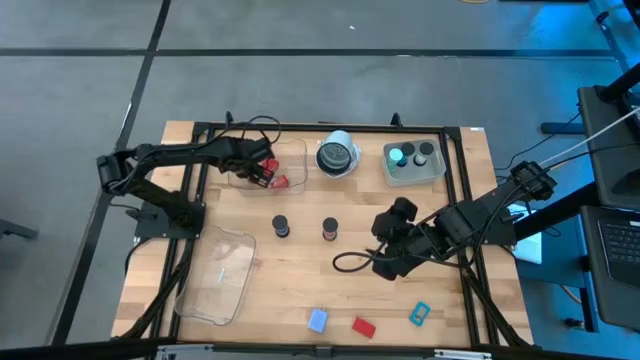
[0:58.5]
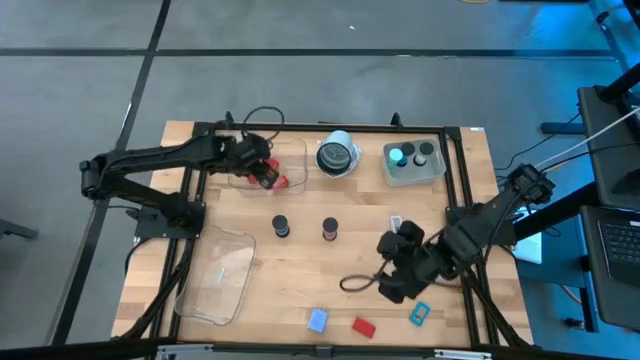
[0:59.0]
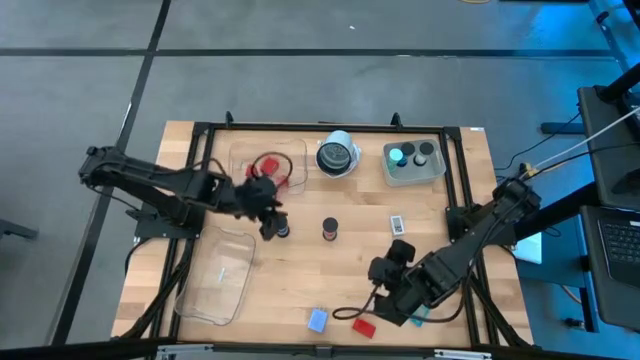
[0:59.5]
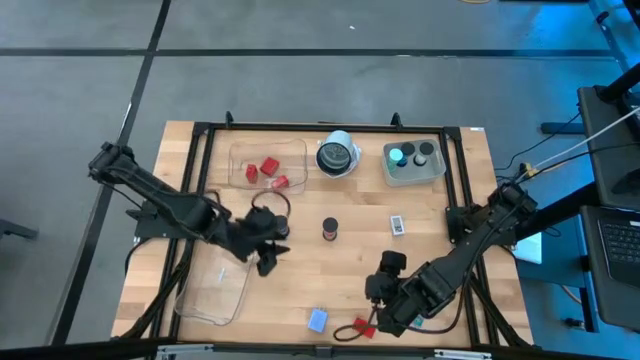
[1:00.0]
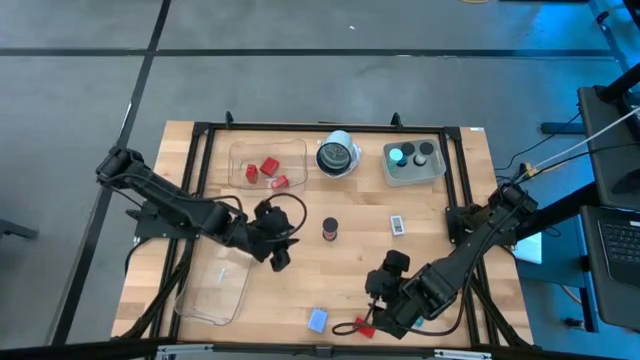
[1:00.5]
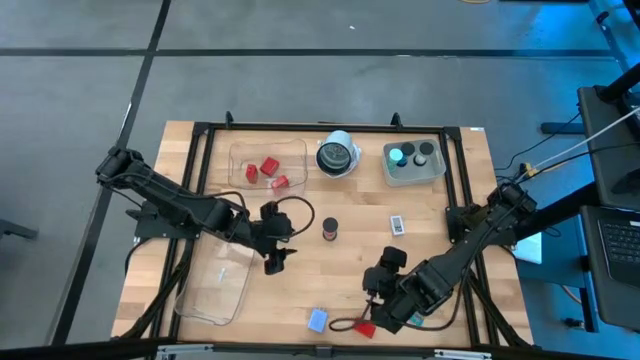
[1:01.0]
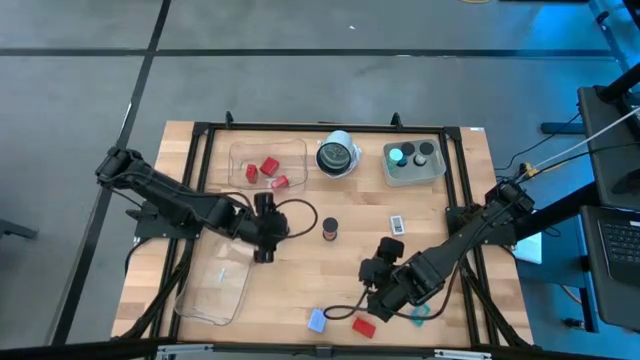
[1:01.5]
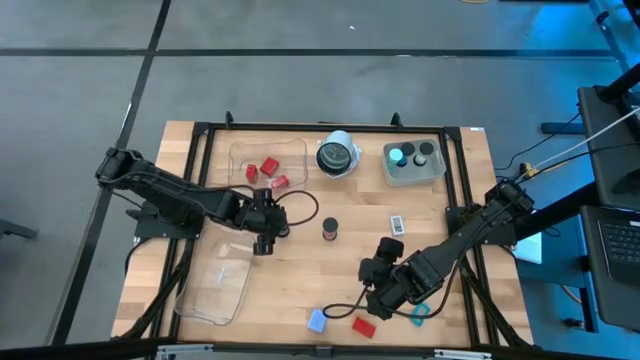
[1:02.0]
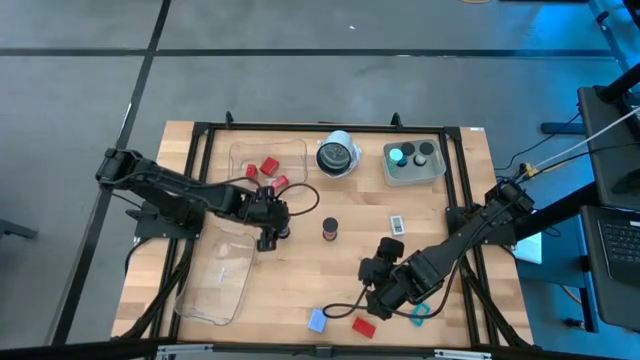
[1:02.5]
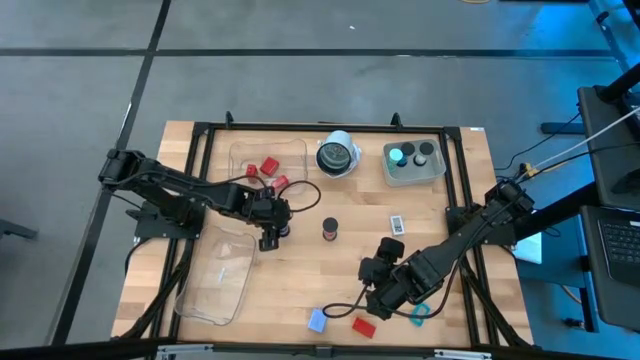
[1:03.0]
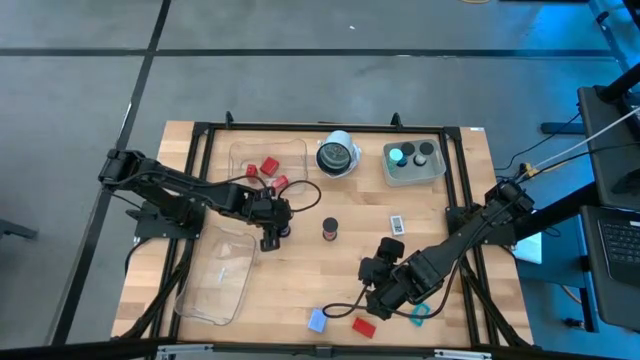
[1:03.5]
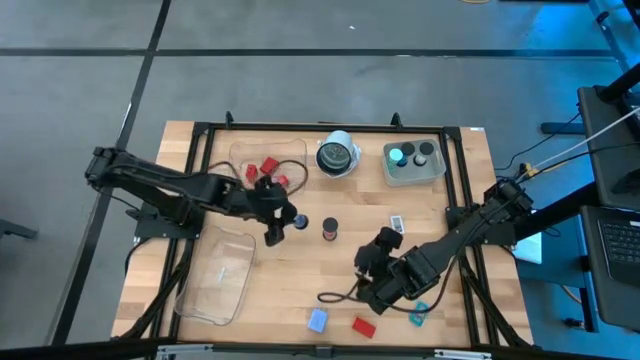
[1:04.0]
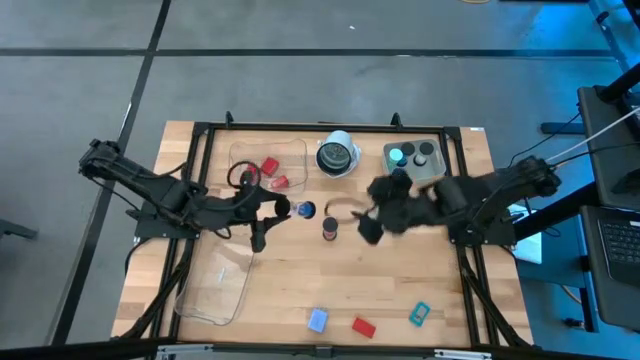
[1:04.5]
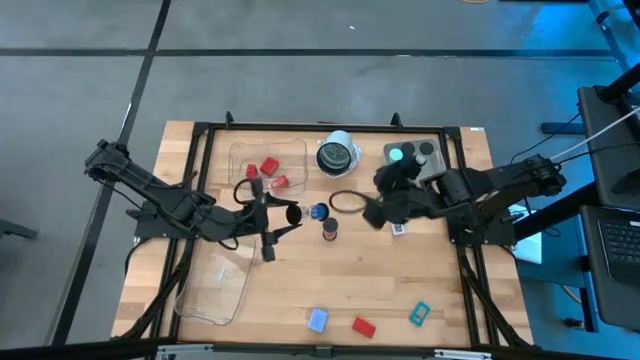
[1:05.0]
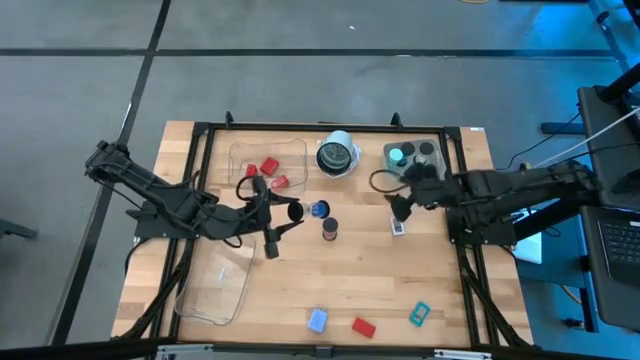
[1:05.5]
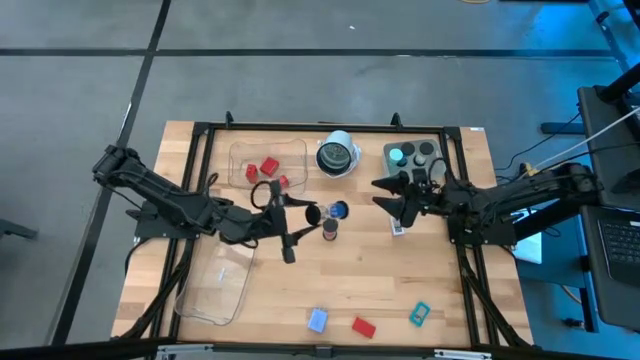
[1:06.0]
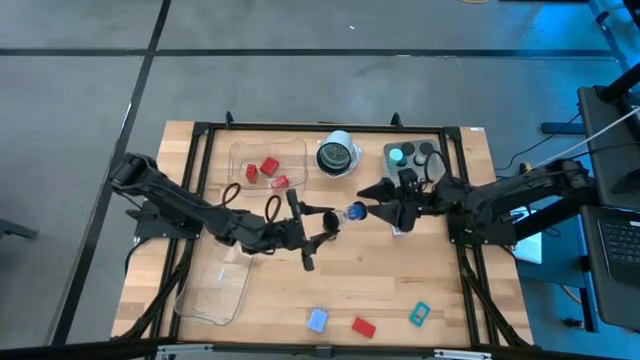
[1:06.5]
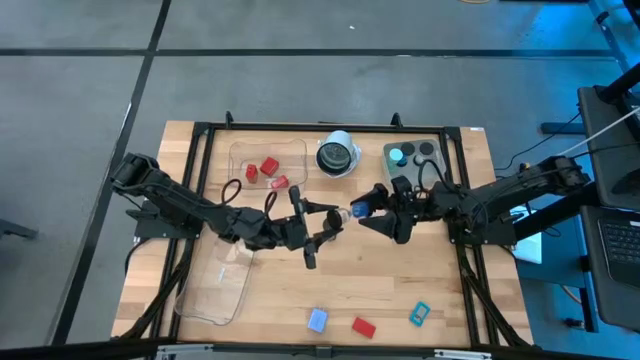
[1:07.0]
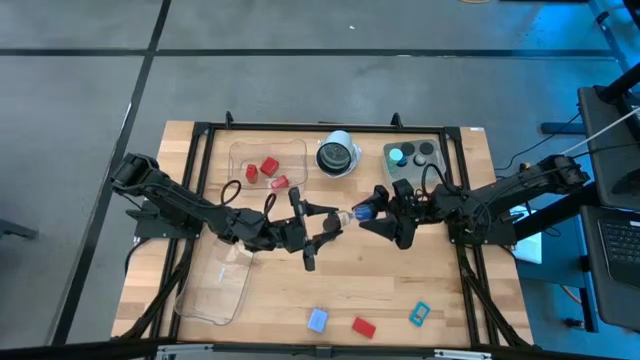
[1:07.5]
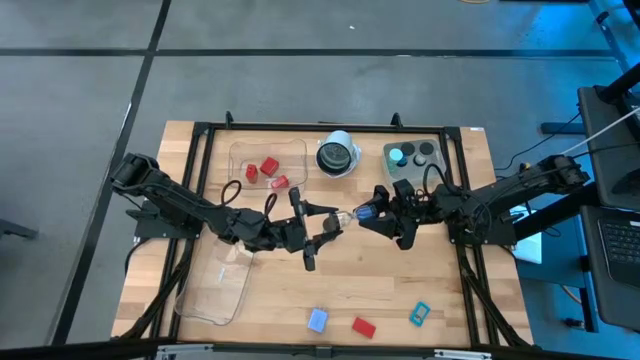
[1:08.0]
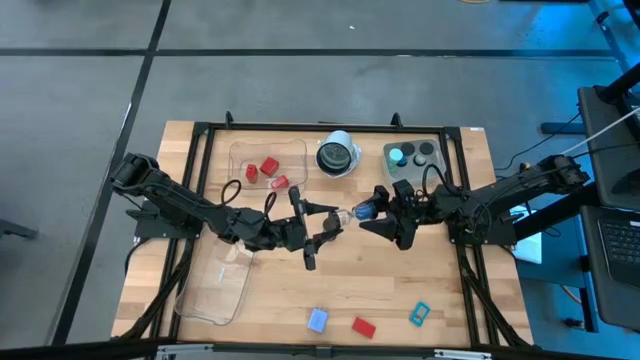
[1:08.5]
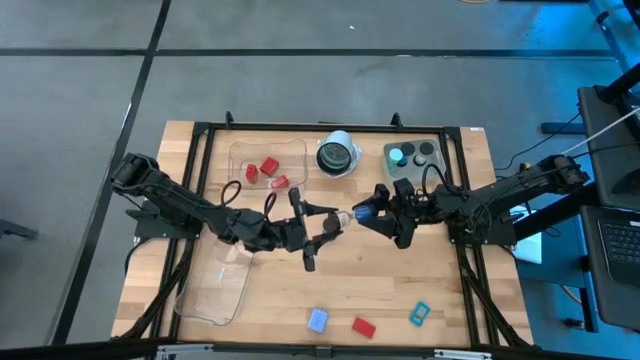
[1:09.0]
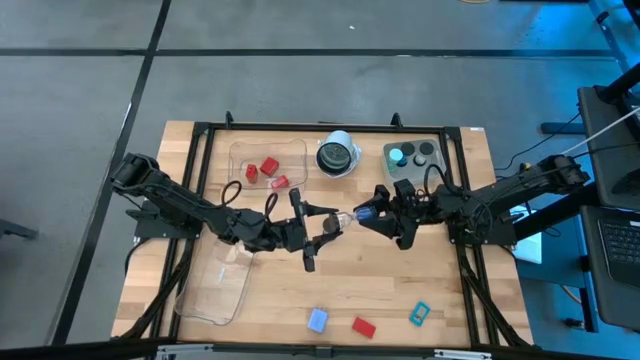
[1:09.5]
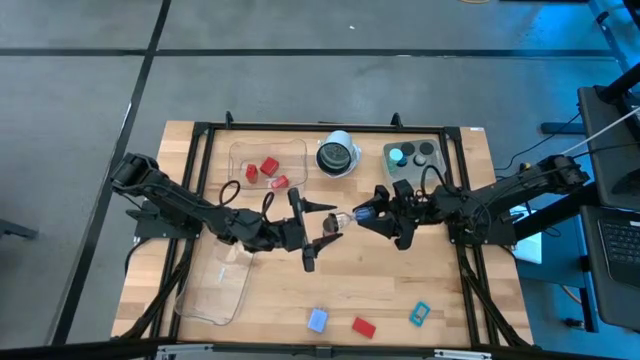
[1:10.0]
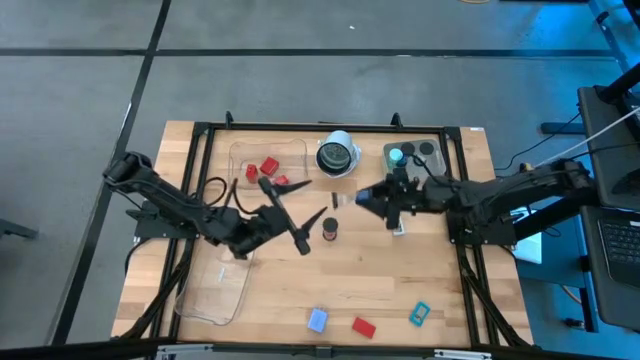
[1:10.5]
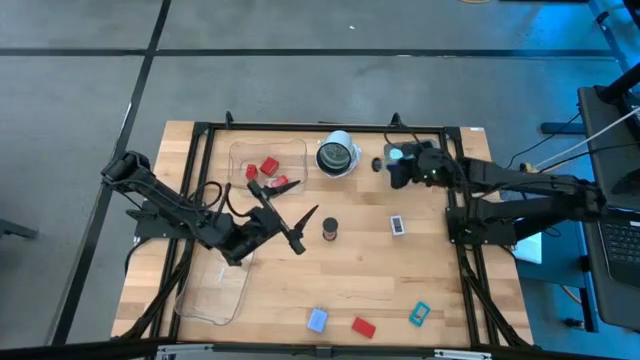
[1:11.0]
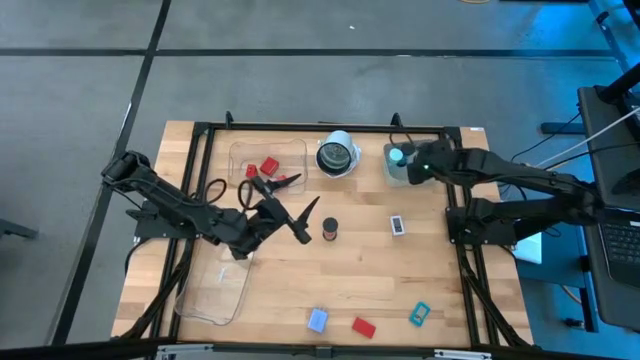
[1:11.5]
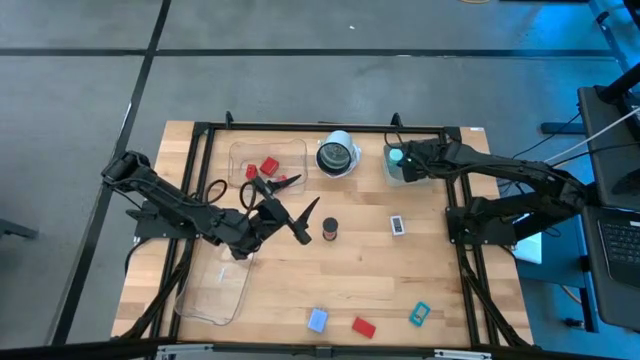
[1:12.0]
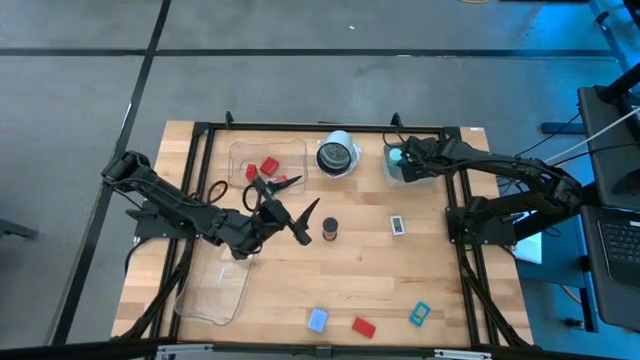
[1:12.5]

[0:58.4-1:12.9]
Task: Pick & Place Office items
Put the dark blue hourglass into the gray bin

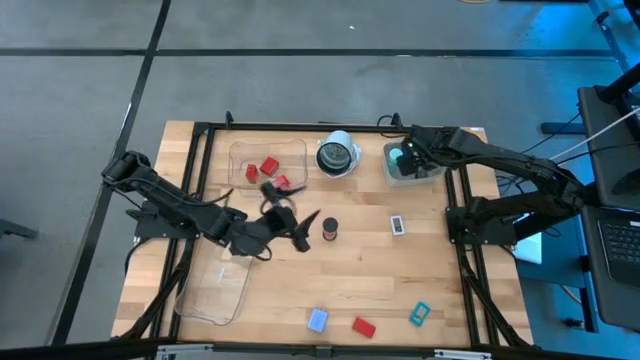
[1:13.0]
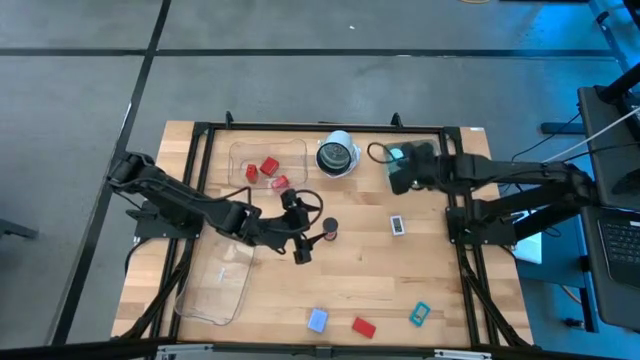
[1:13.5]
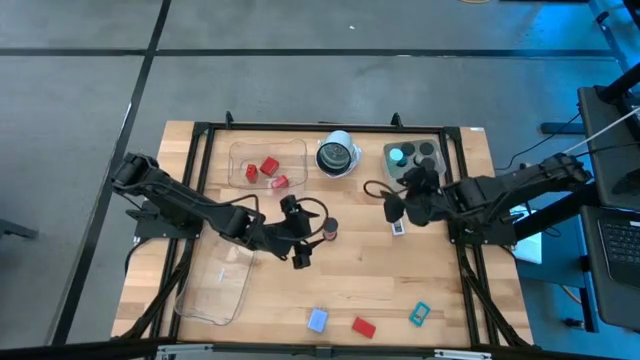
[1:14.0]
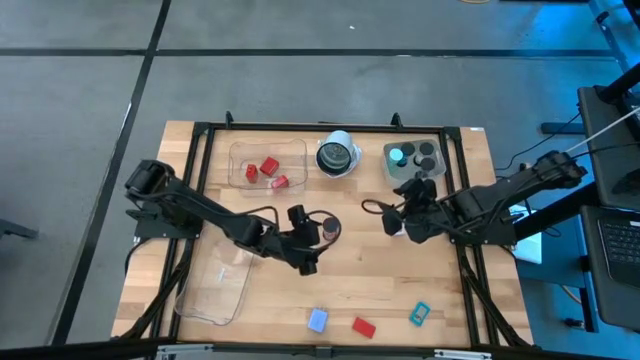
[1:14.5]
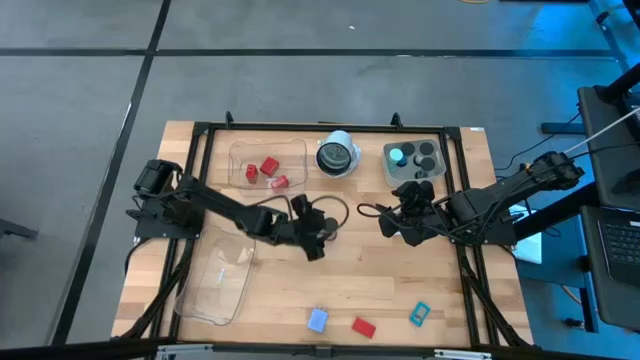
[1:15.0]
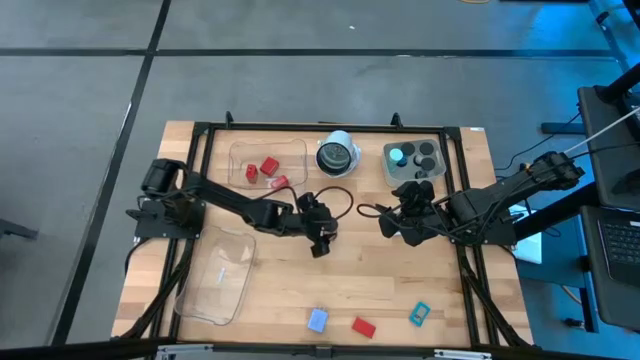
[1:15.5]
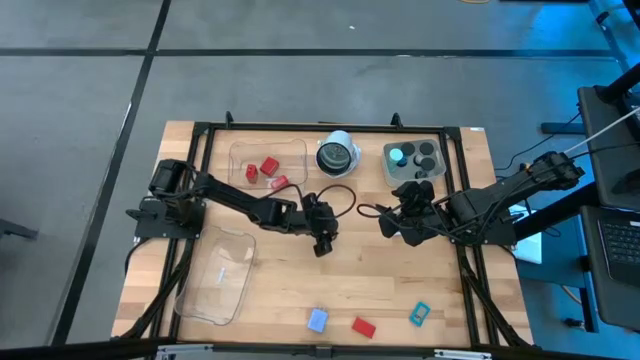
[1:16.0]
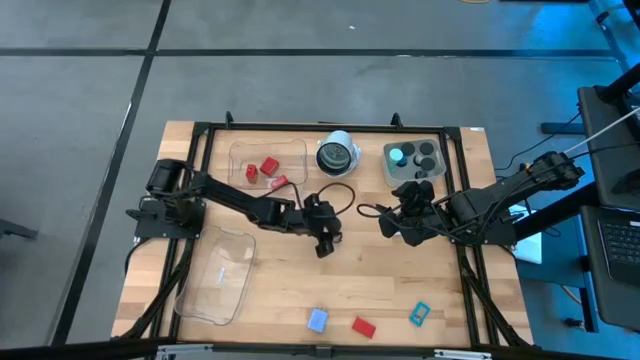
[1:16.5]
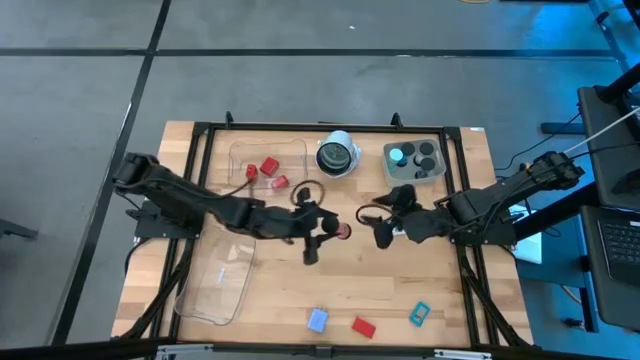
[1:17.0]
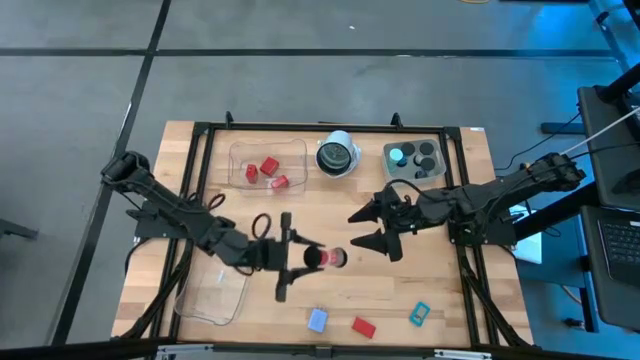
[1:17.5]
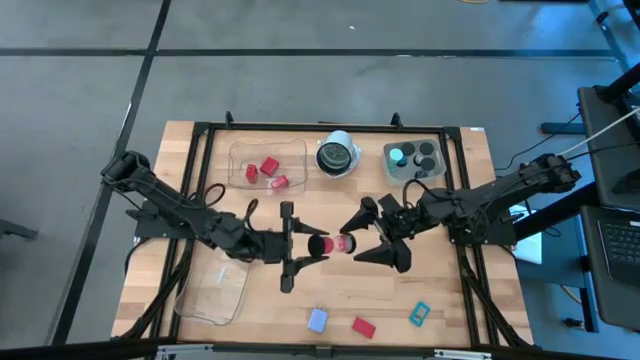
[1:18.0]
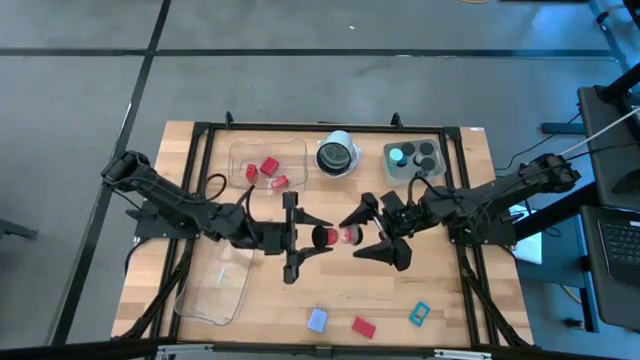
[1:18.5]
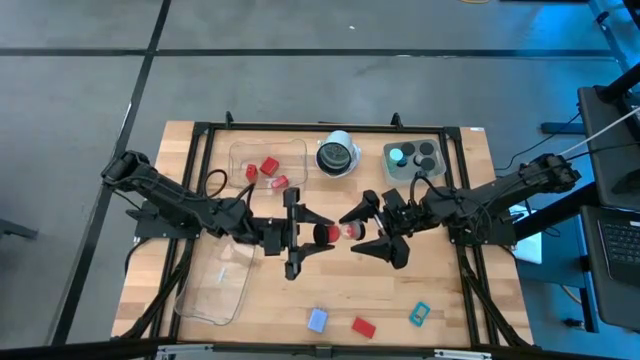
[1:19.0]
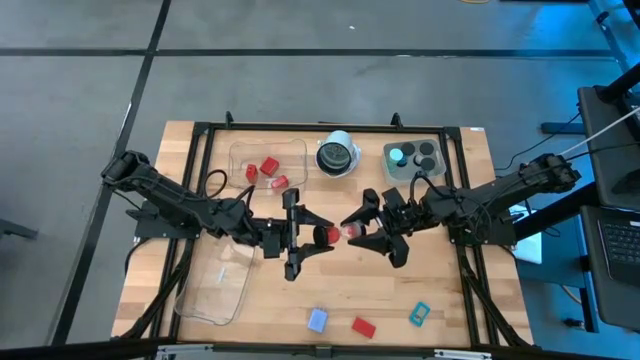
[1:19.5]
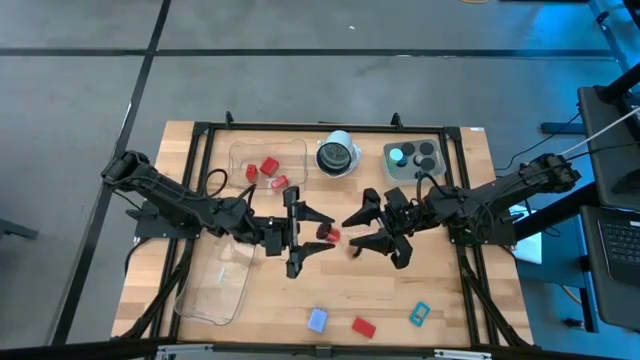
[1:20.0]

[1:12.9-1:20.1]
Put the red hourglass into the gray bin

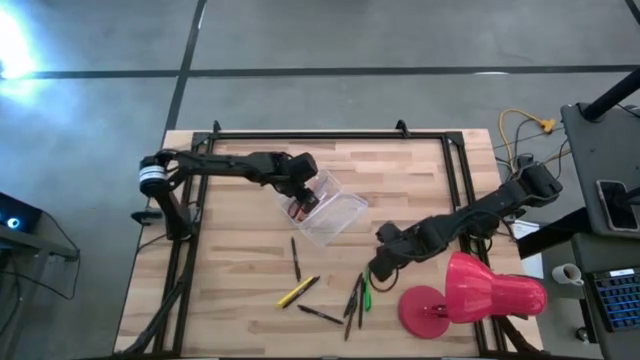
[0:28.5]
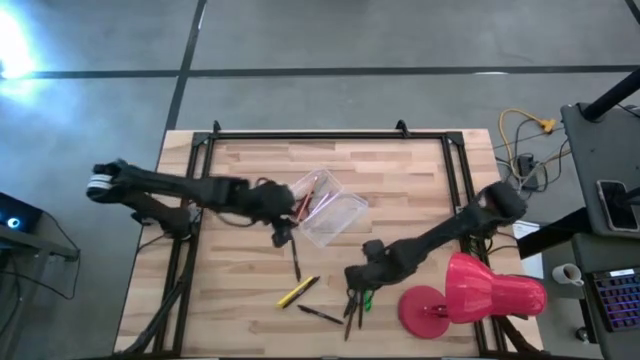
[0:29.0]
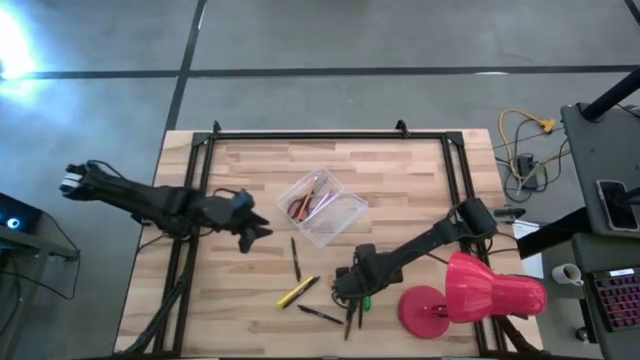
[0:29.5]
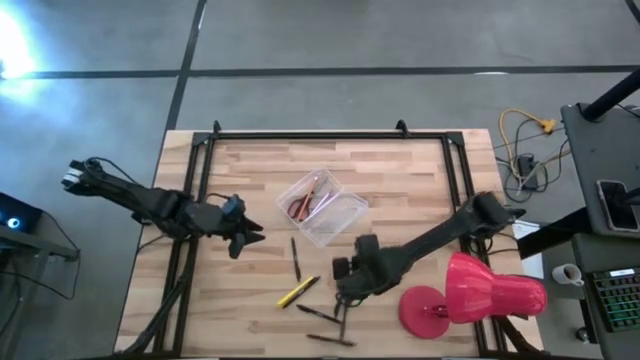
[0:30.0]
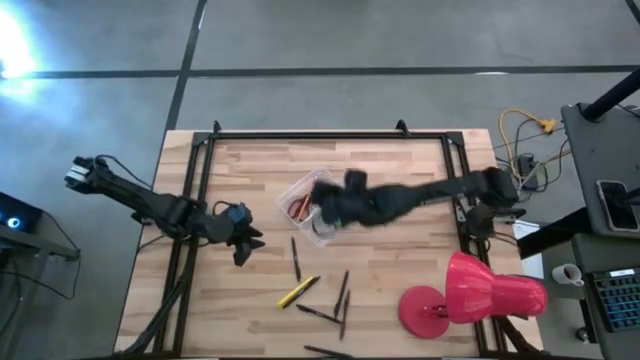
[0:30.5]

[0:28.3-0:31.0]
Task: Pick & place school supplies into a supply box
Put the green pen into the transparent supply box
